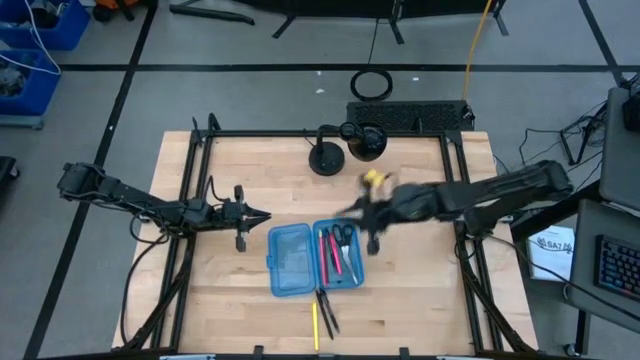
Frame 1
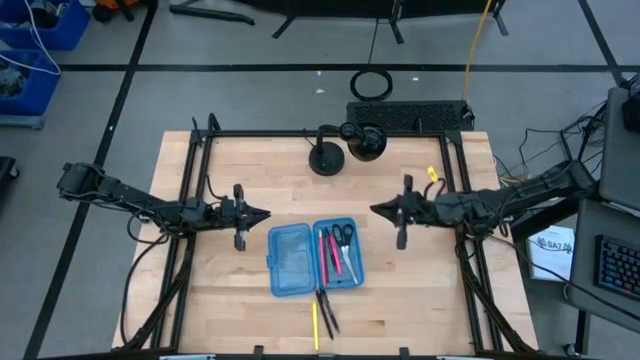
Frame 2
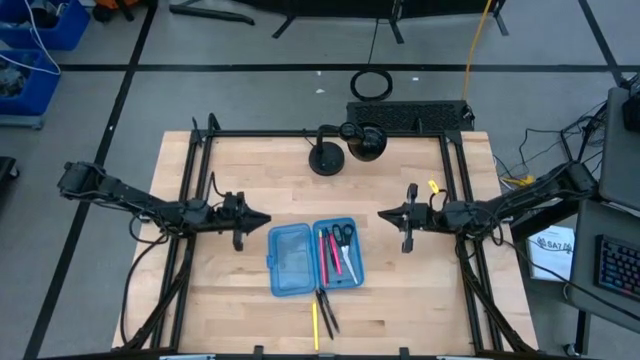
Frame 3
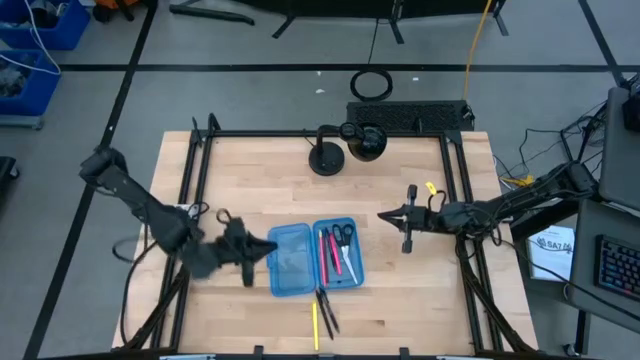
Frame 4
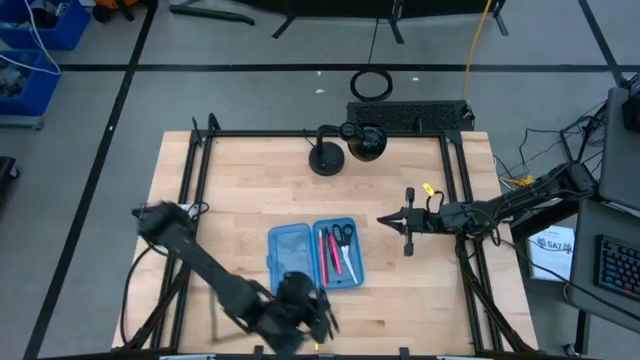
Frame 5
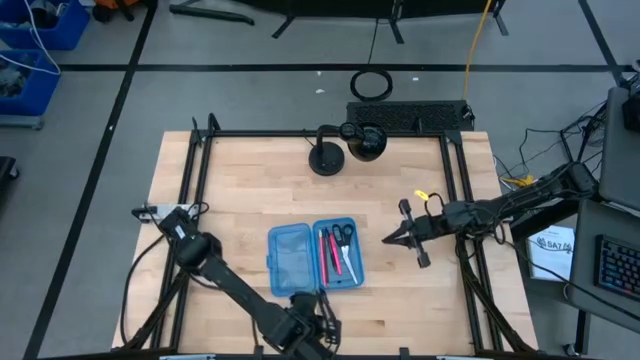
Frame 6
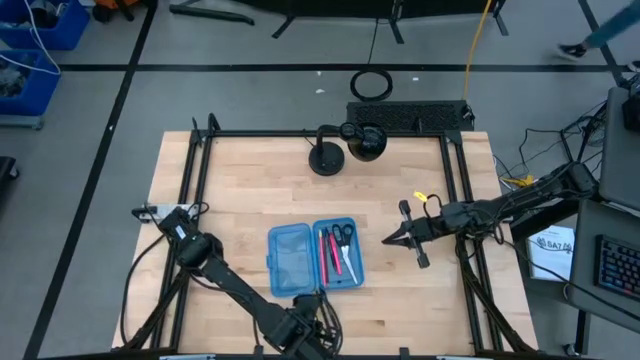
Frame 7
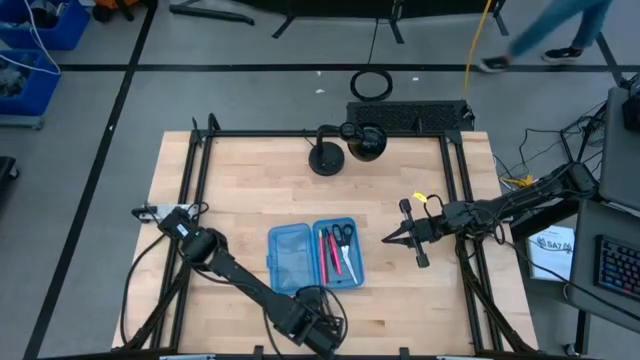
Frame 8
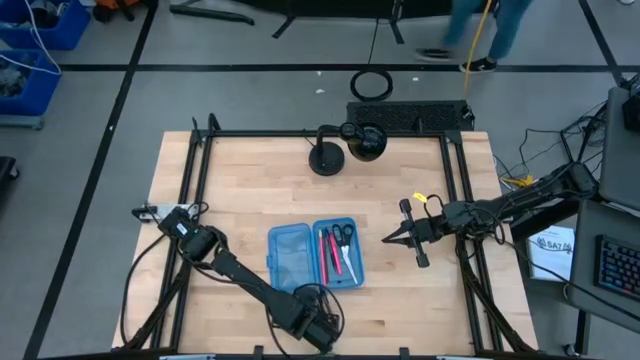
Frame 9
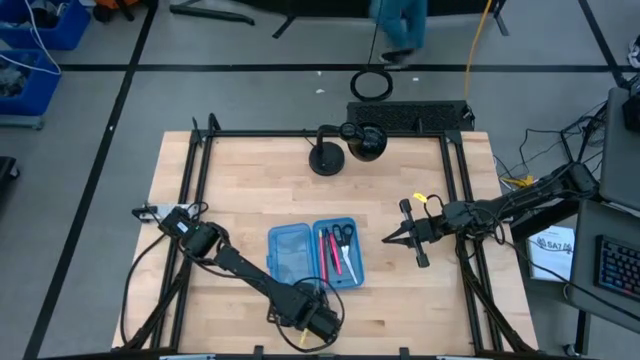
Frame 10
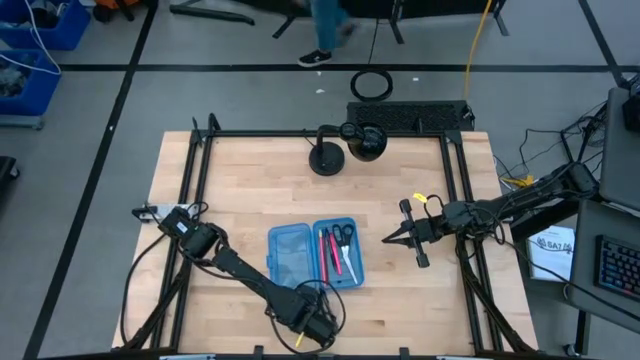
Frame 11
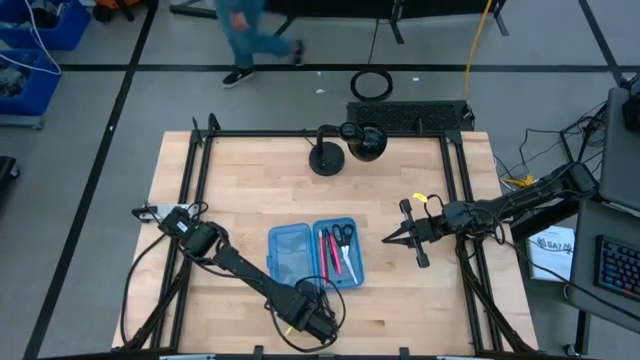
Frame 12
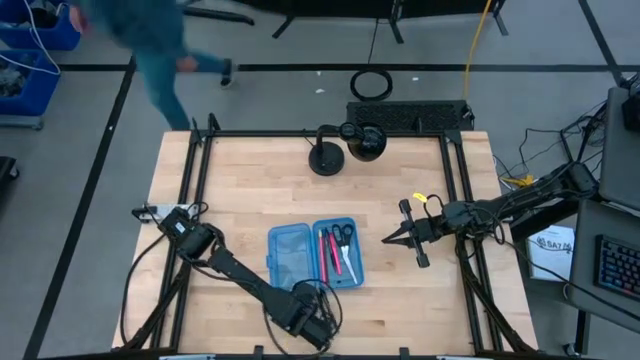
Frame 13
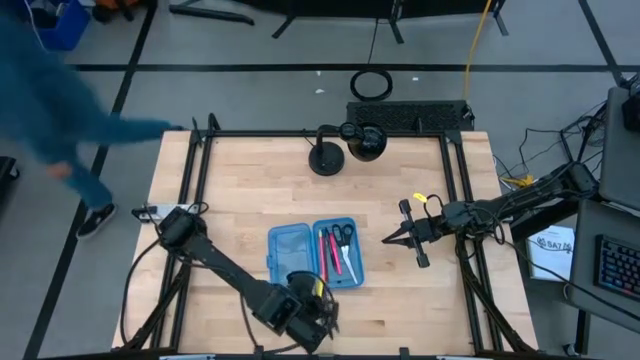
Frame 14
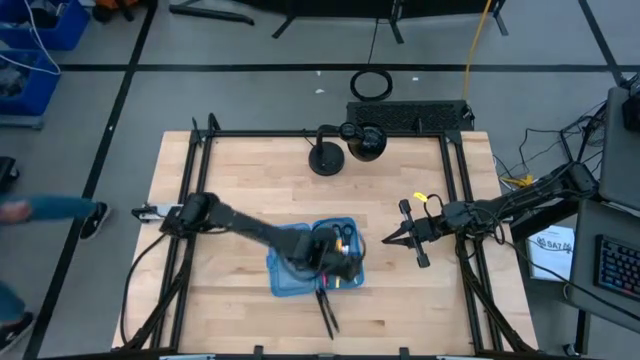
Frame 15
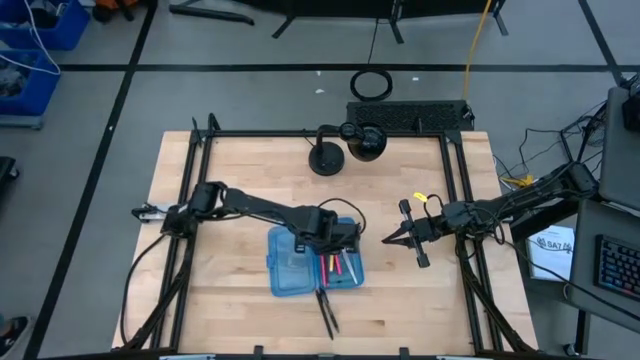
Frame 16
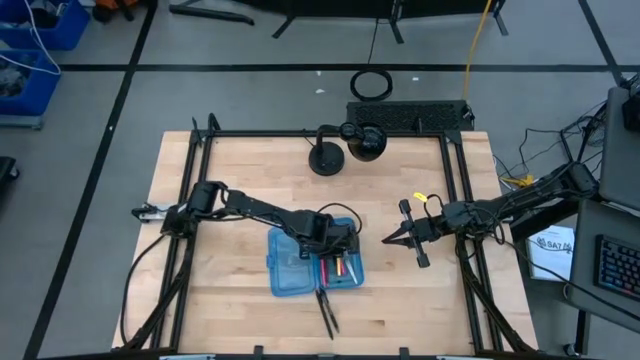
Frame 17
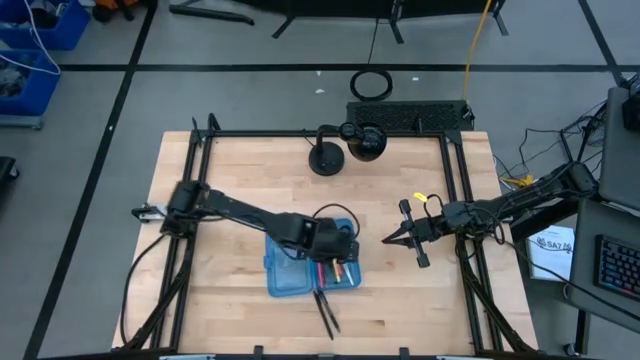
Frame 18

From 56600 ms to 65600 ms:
Task: Pick & place school supplies into a supply box
Put the yellow pen into the blue supply box

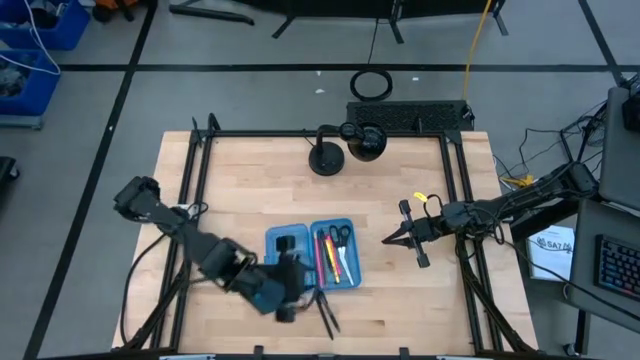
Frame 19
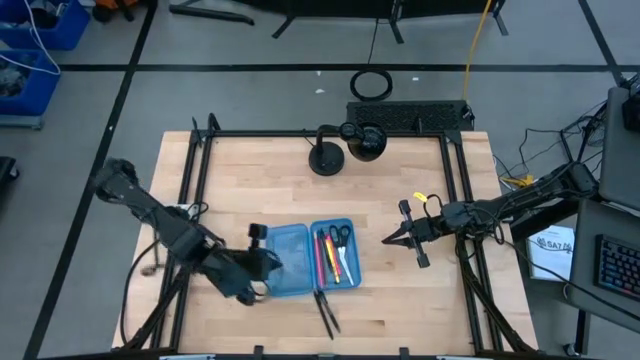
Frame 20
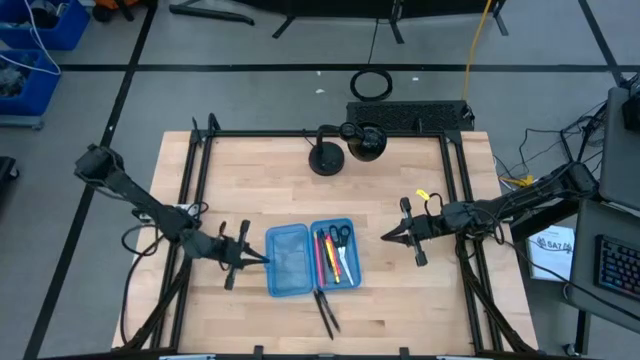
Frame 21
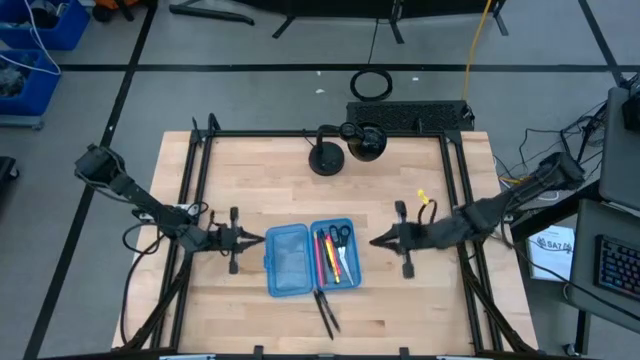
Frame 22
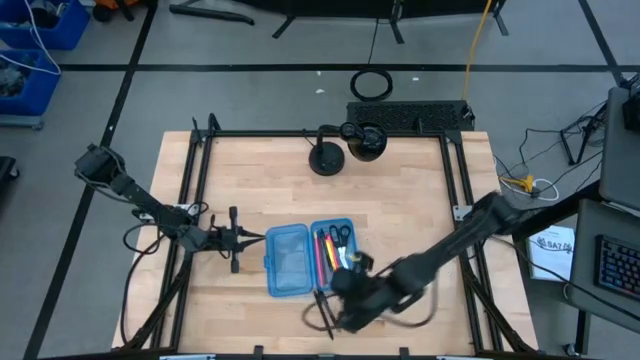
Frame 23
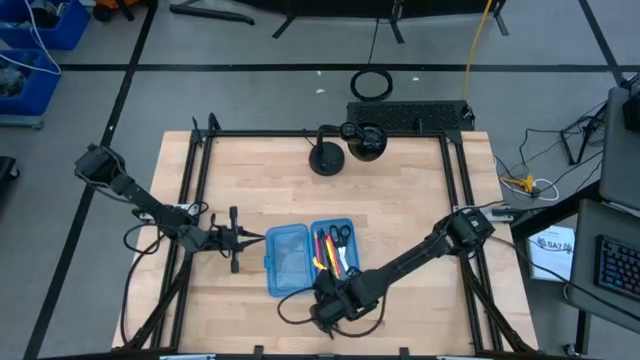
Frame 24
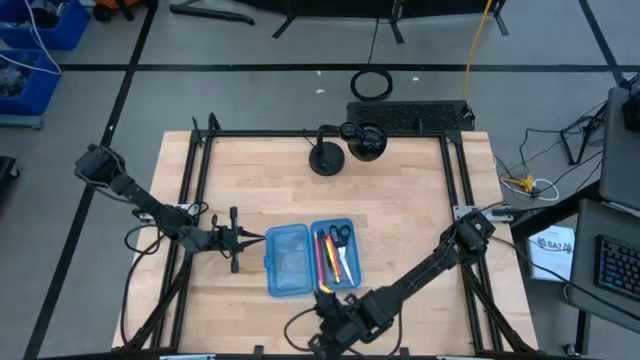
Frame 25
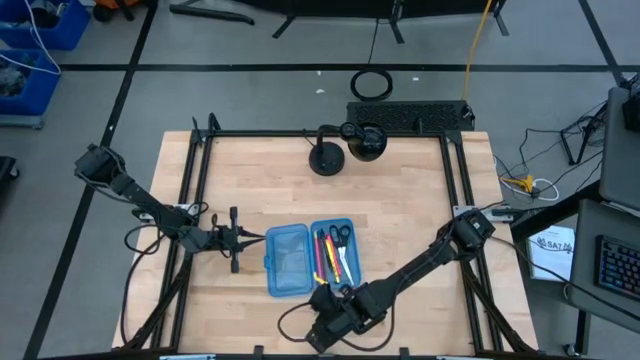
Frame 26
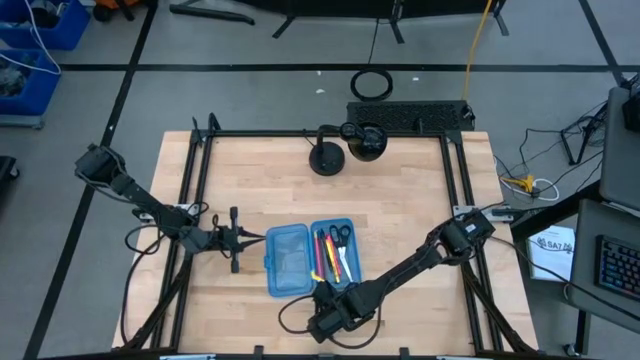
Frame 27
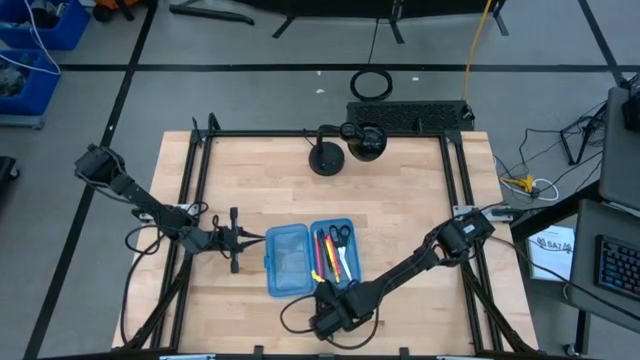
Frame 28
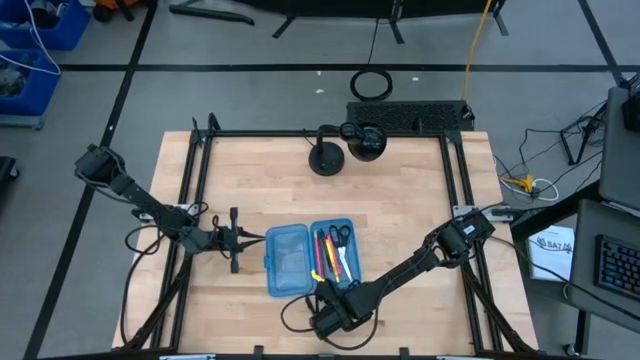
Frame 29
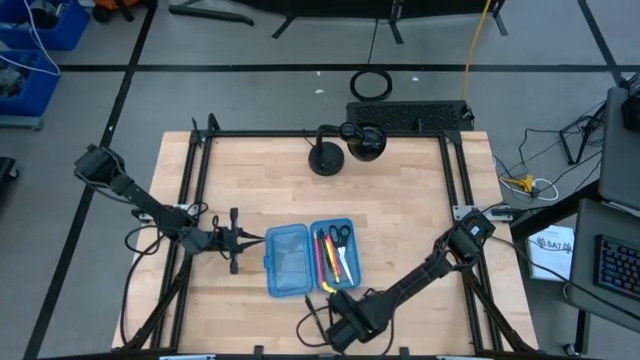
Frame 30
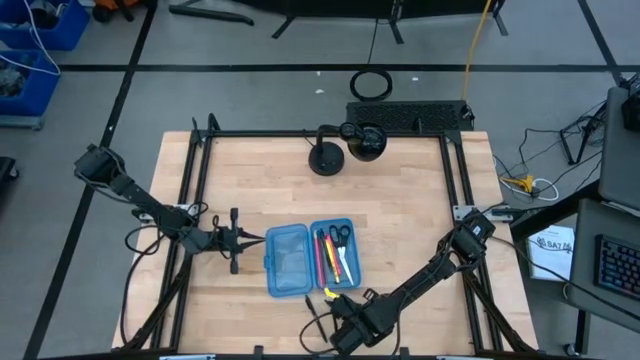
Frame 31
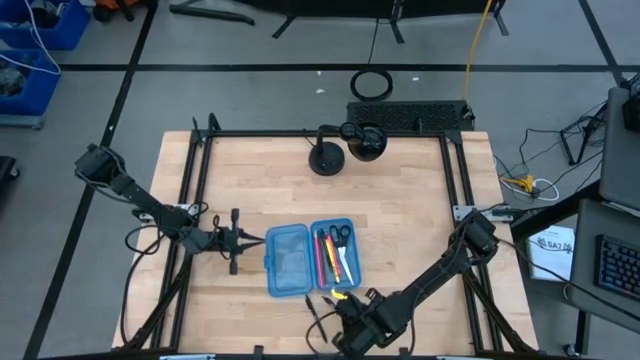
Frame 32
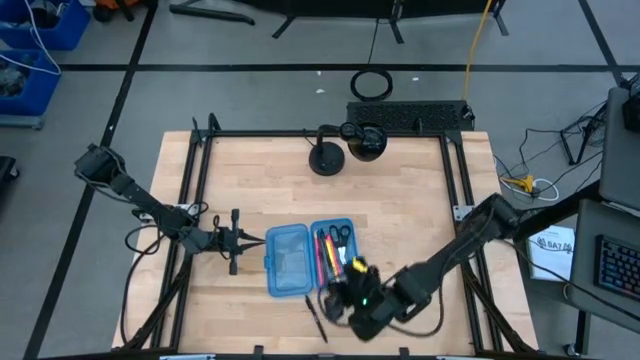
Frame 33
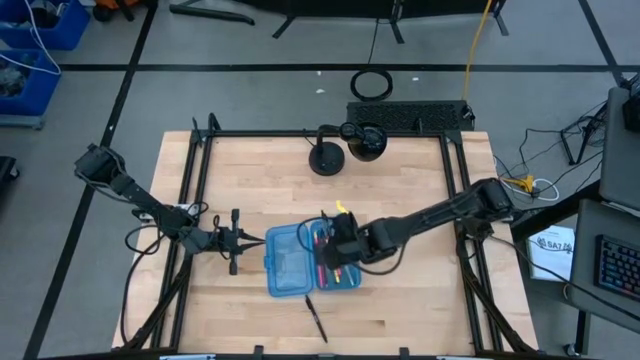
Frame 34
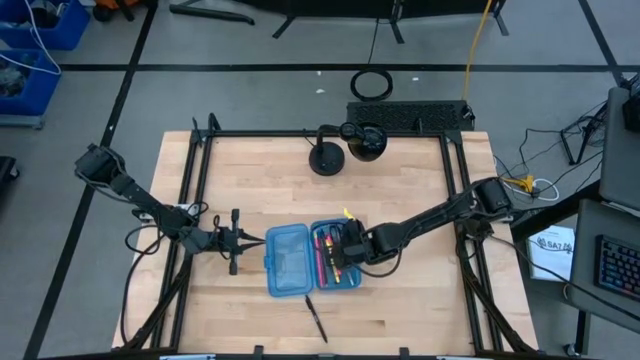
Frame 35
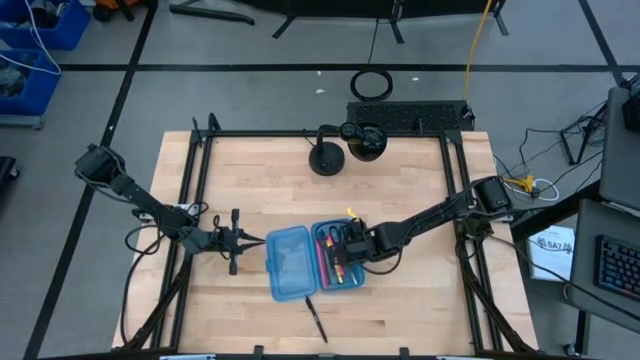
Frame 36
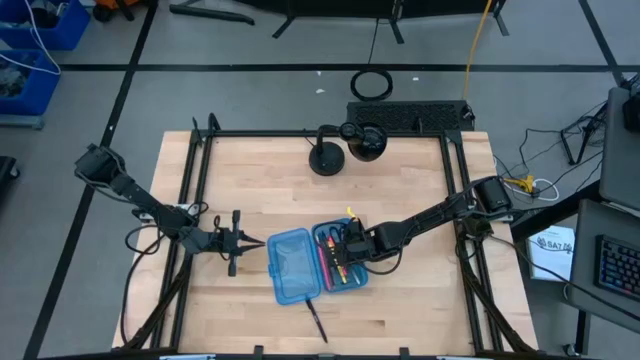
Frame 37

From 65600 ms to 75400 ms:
Put the right black pen into the blue supply box

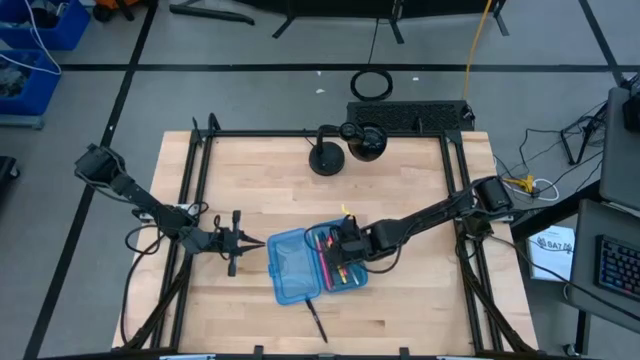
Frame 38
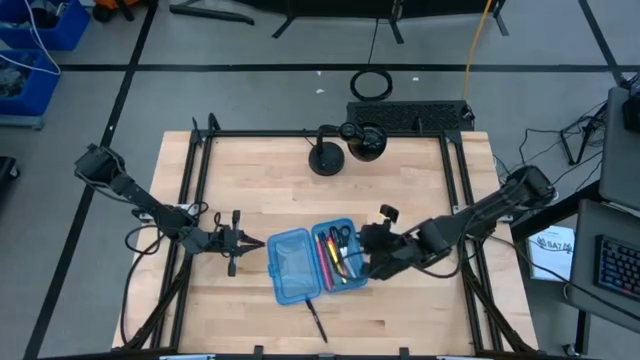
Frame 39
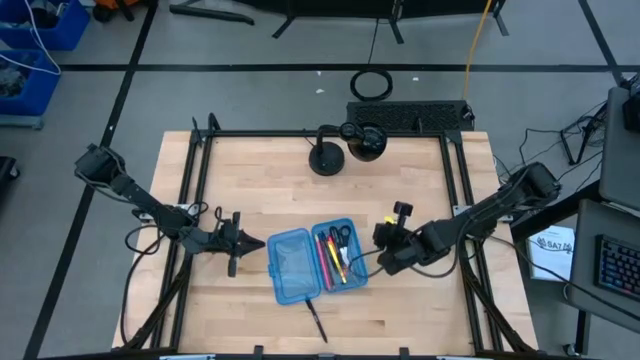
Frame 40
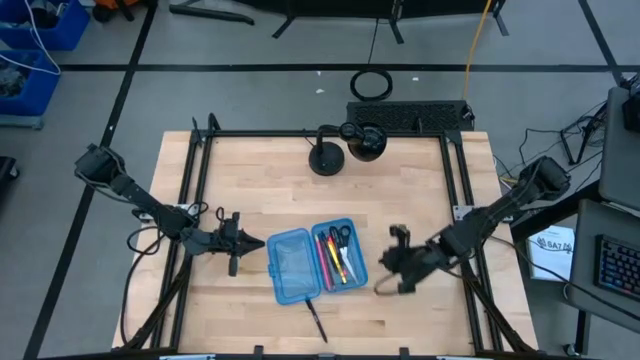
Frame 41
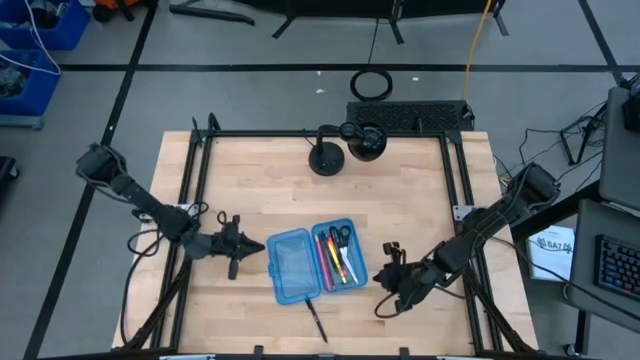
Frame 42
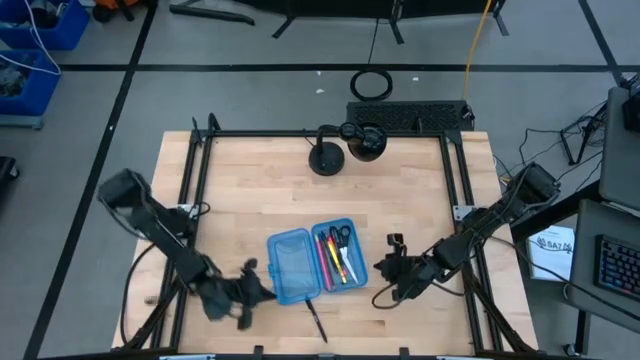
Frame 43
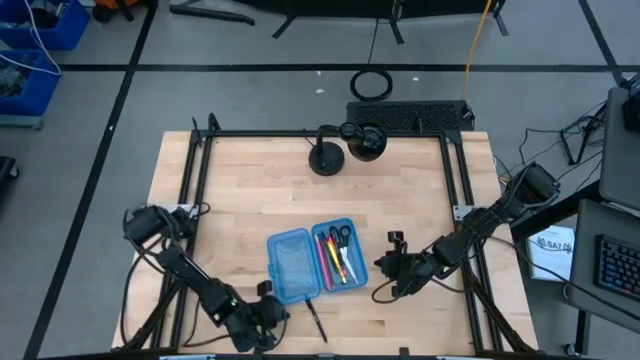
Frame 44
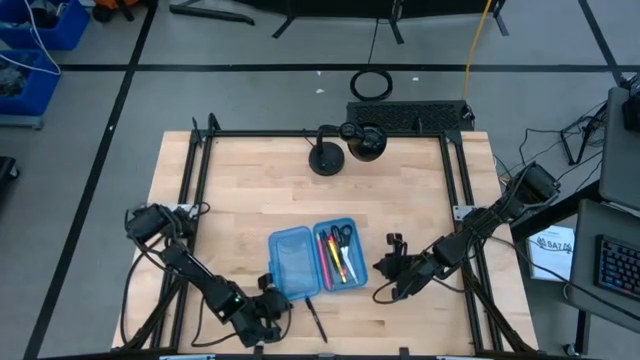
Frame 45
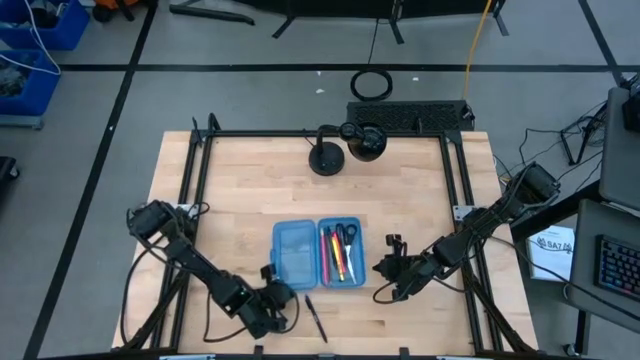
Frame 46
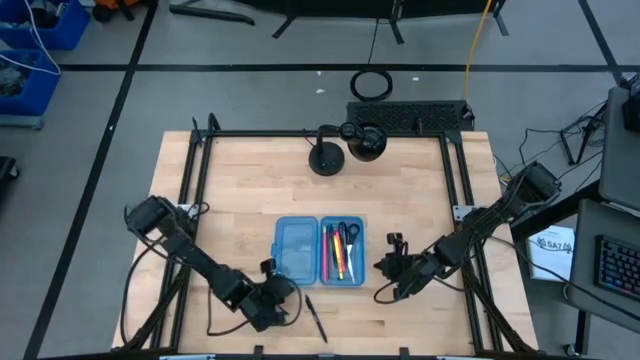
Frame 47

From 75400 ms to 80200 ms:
Adjust the blue supply box
